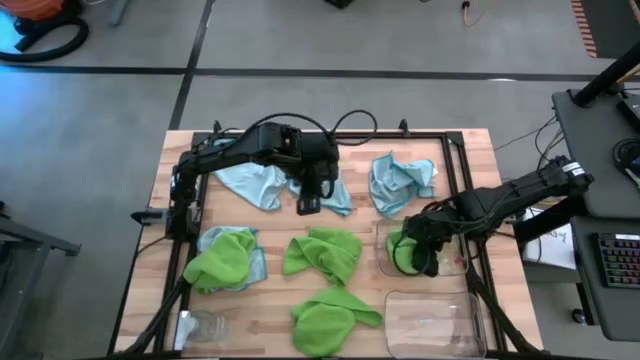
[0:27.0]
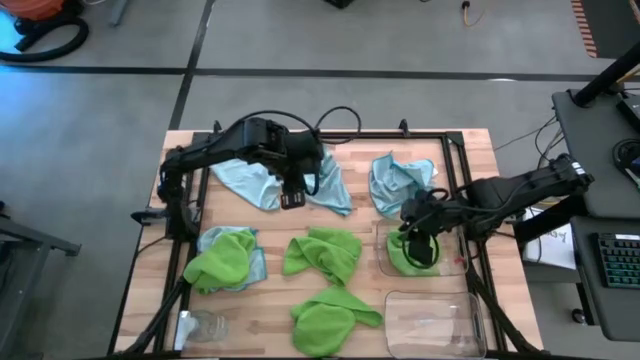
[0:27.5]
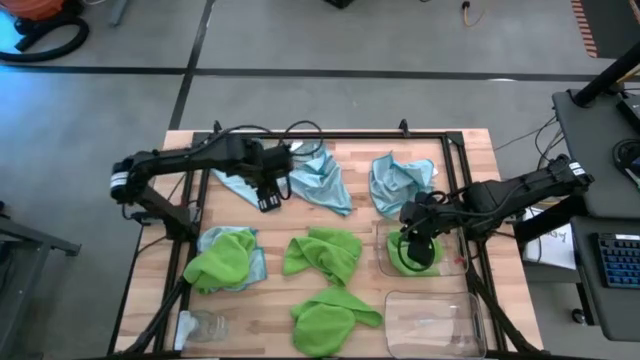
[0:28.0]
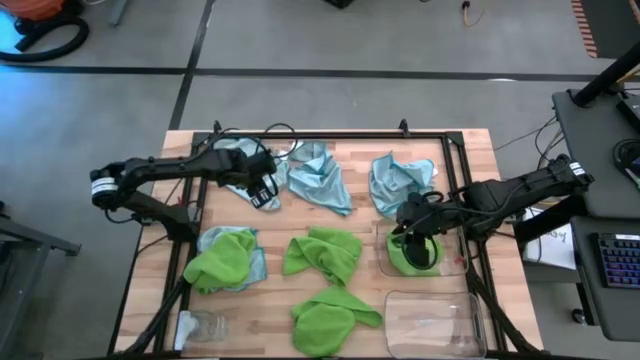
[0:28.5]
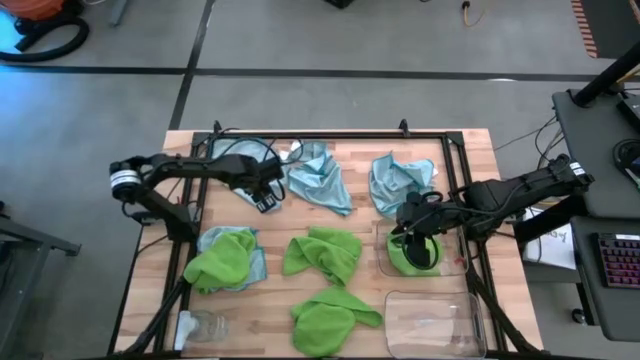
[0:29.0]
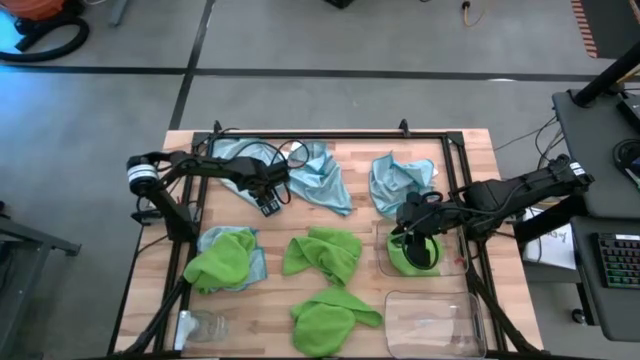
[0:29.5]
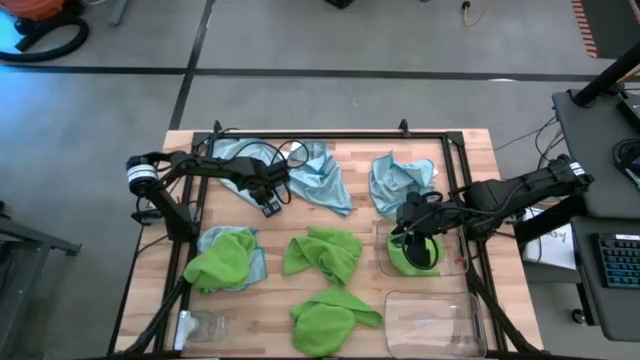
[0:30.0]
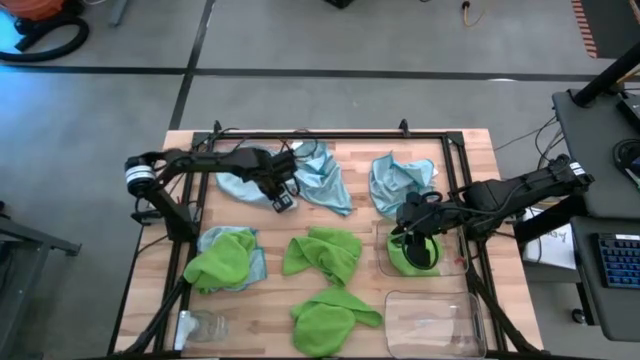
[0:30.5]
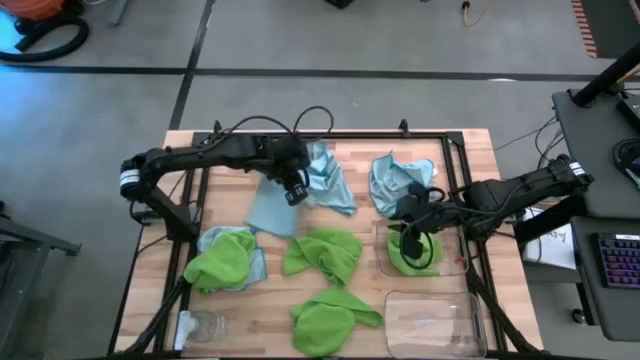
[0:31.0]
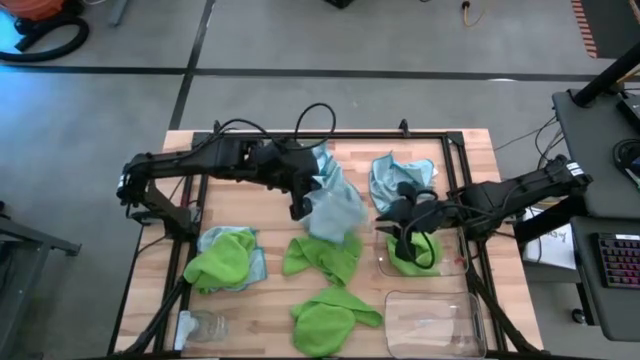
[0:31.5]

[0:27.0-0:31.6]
Task: Sort microfiber towel by color & place in baskets
Put the blue microfiber cloth into the bottom transparent bin

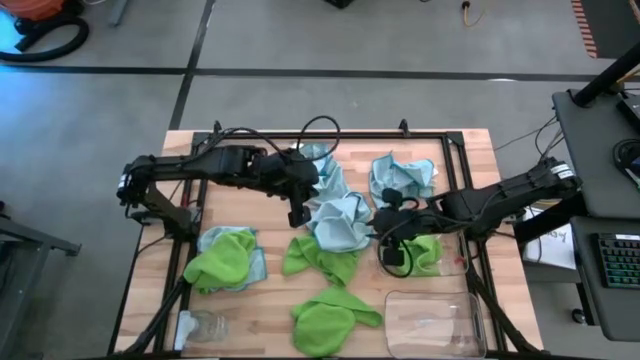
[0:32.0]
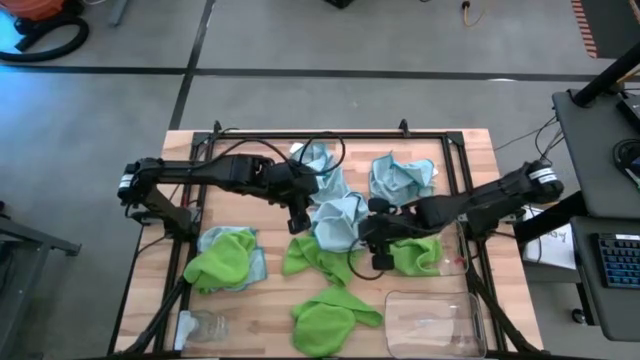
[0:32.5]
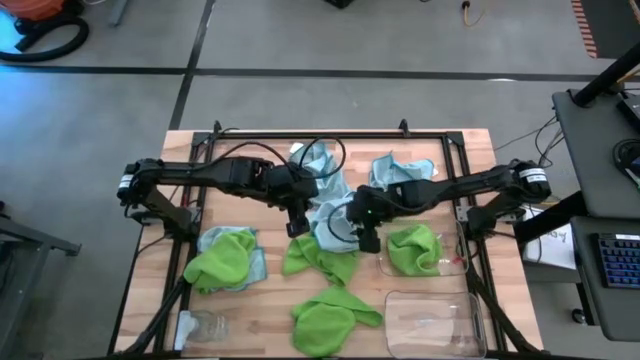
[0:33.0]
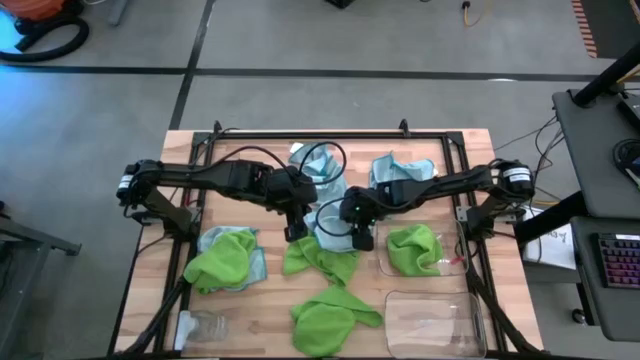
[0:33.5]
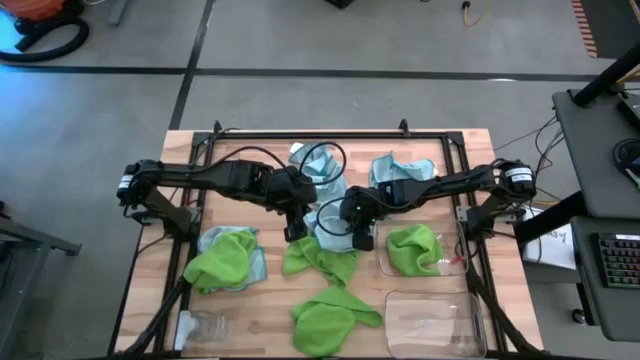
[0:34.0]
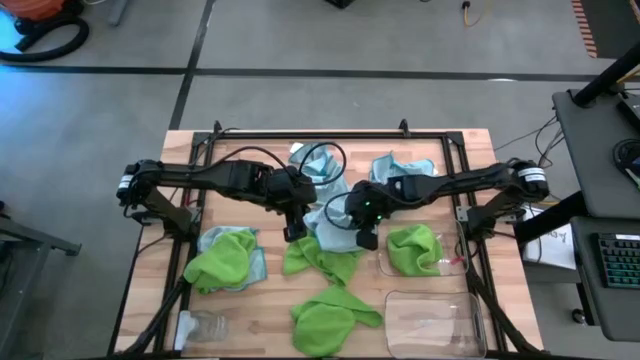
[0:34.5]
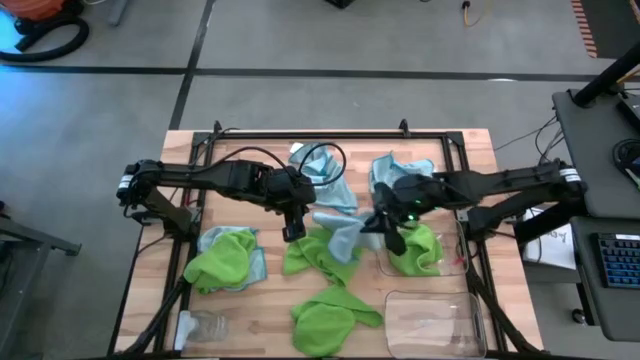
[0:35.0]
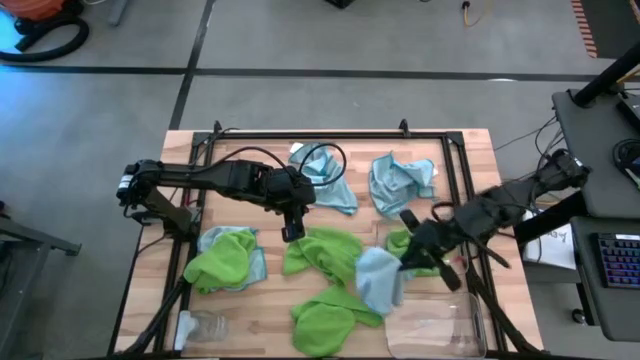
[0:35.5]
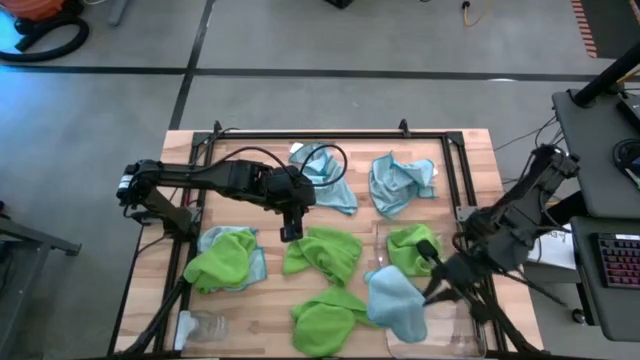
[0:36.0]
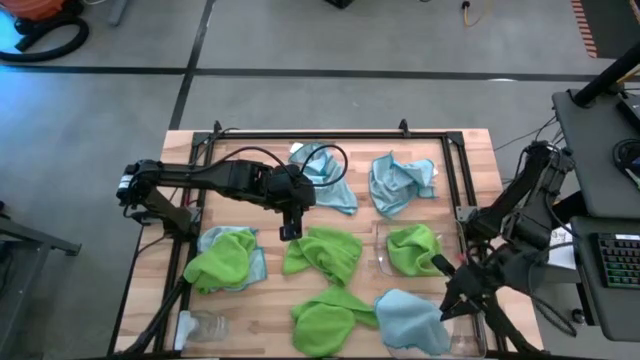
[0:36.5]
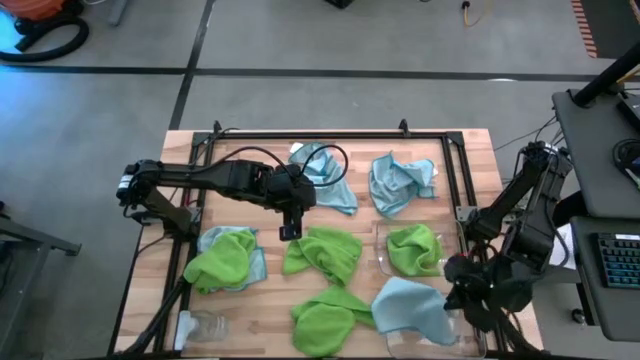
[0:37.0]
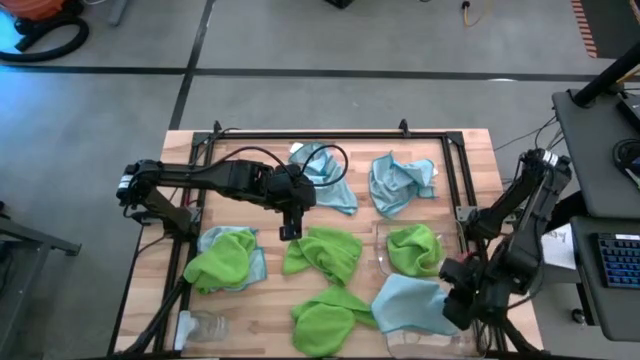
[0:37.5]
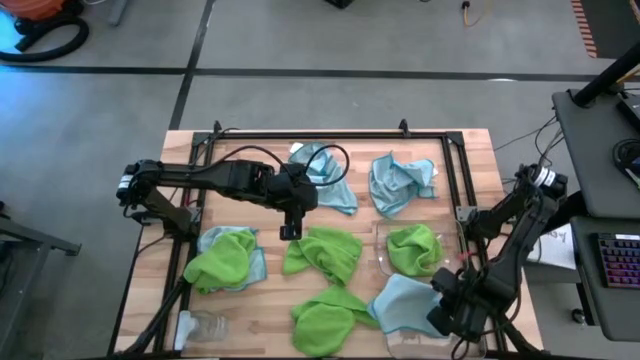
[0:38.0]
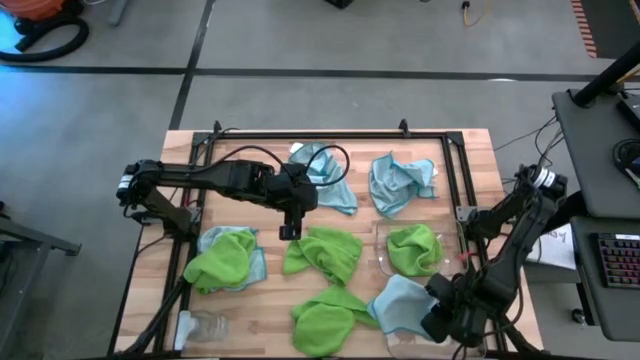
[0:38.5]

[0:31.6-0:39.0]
Put the blue microfiber cloth into the bottom transparent bin

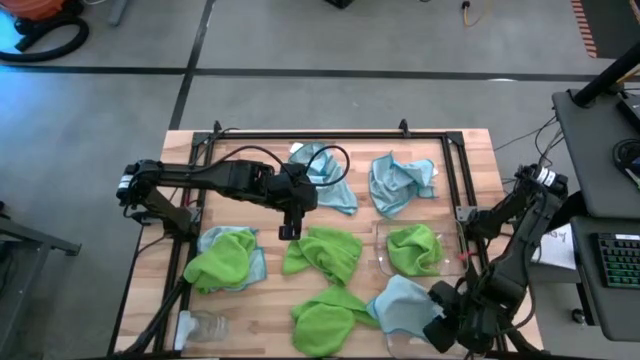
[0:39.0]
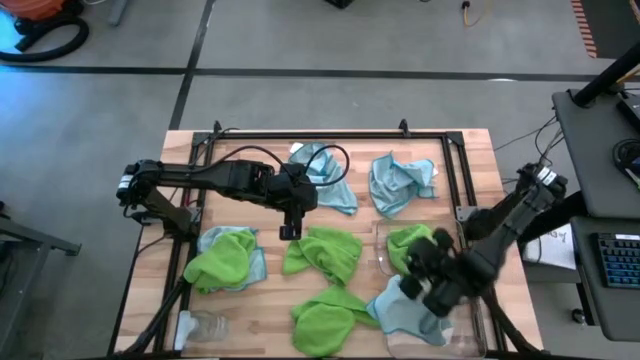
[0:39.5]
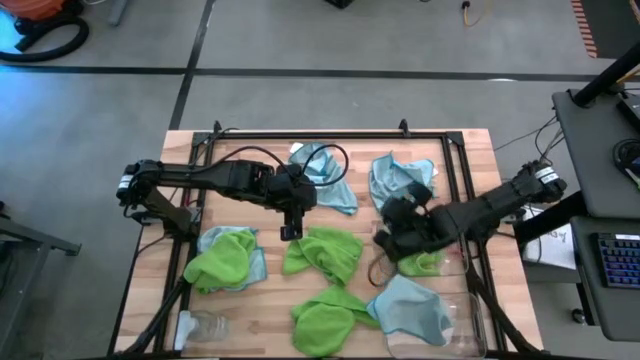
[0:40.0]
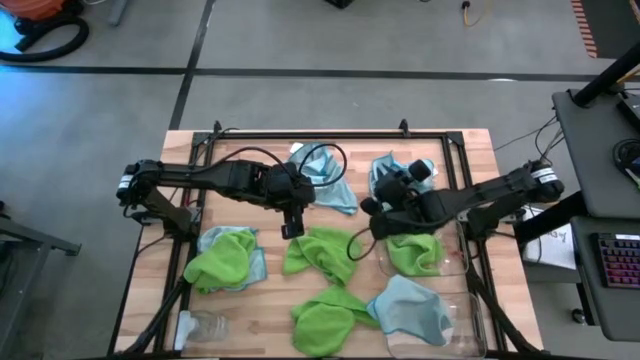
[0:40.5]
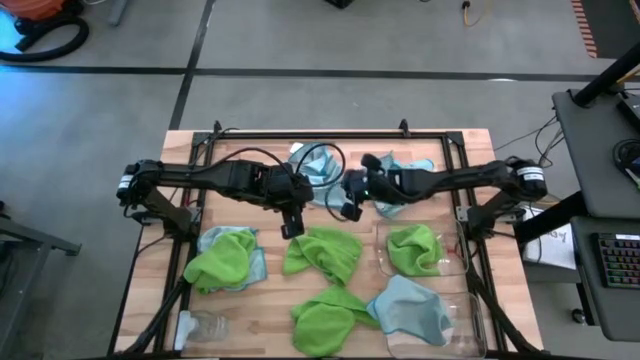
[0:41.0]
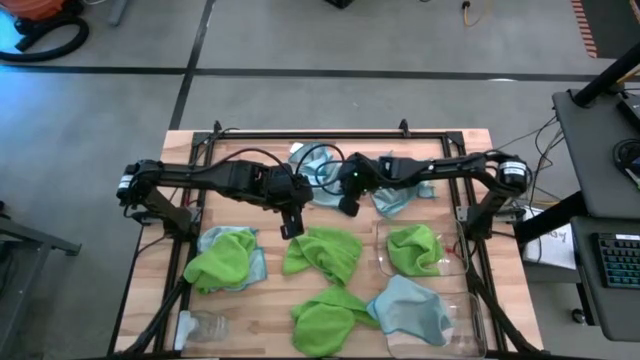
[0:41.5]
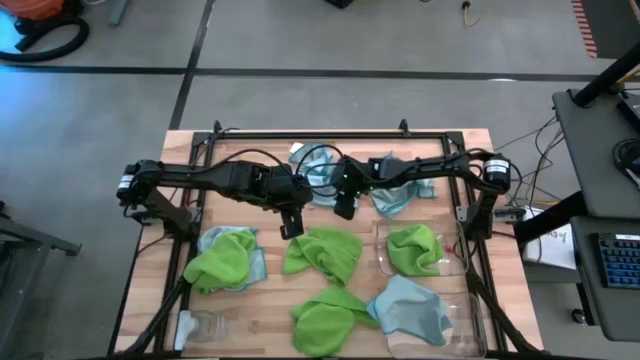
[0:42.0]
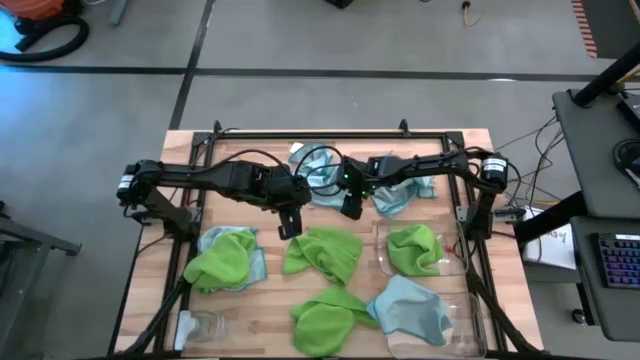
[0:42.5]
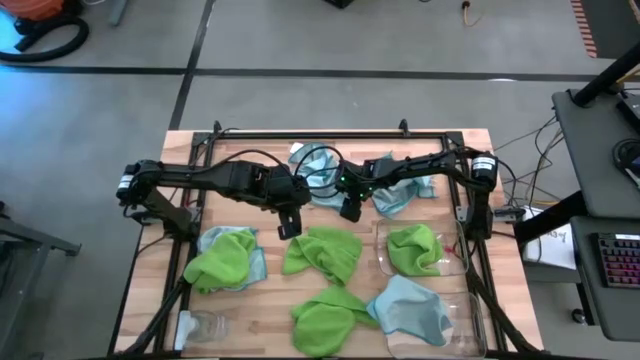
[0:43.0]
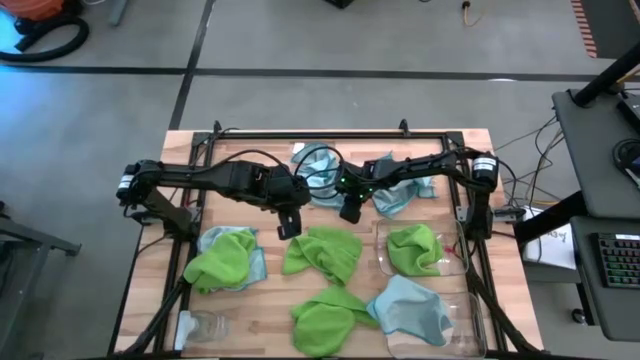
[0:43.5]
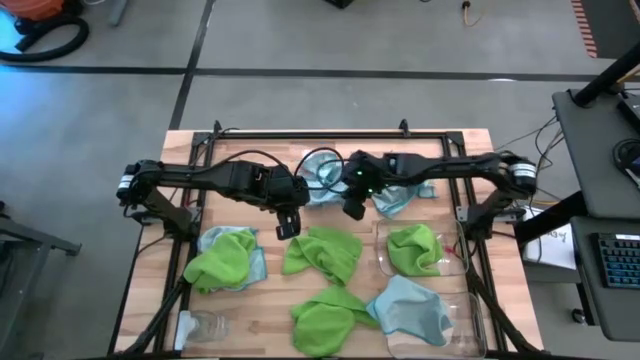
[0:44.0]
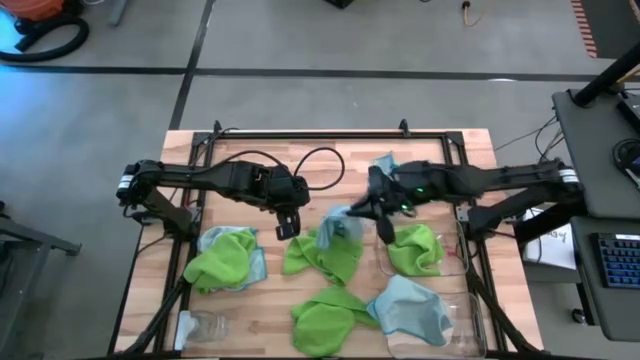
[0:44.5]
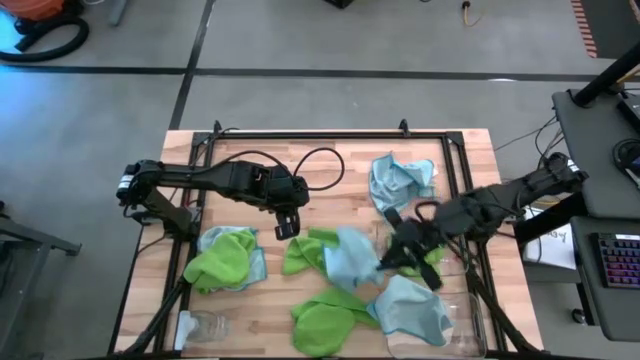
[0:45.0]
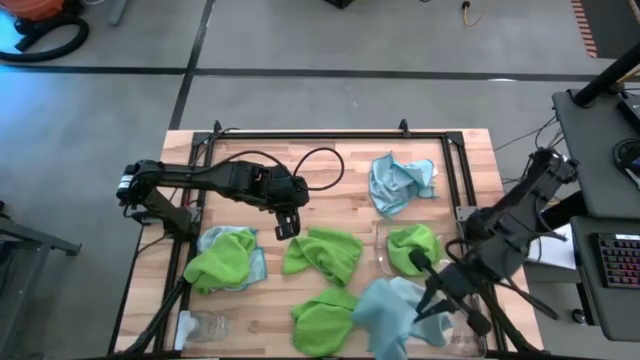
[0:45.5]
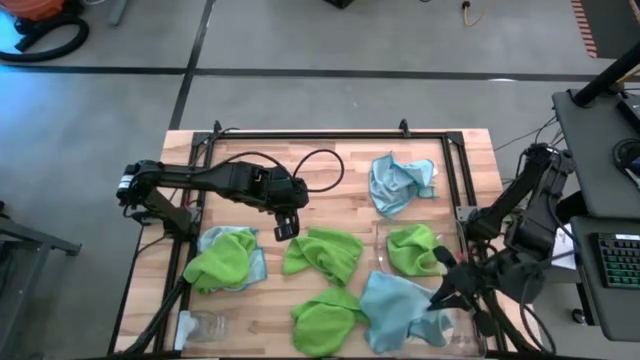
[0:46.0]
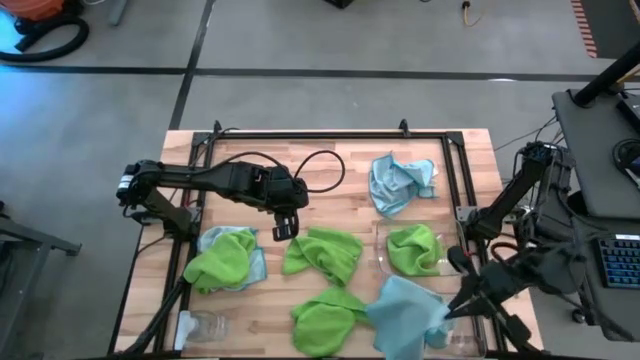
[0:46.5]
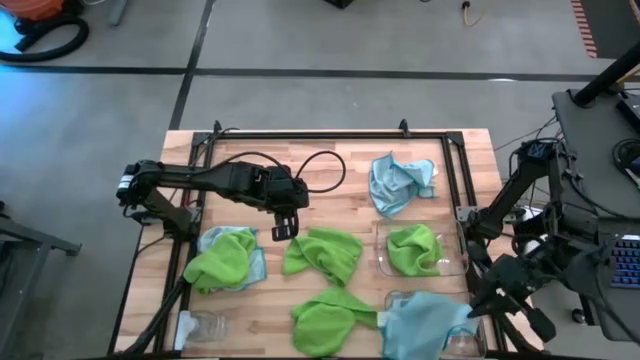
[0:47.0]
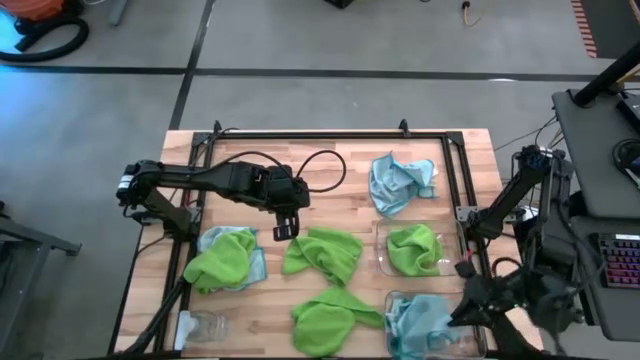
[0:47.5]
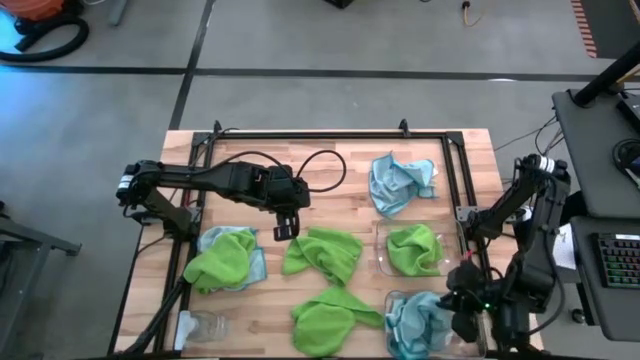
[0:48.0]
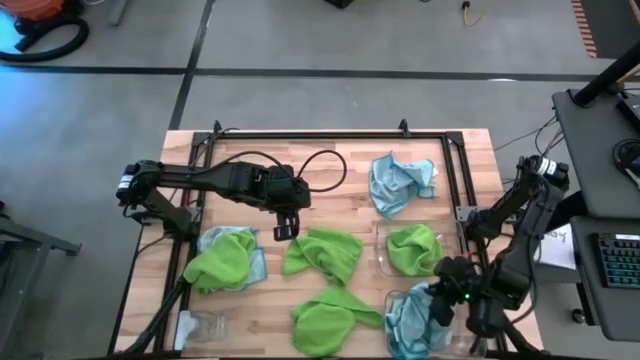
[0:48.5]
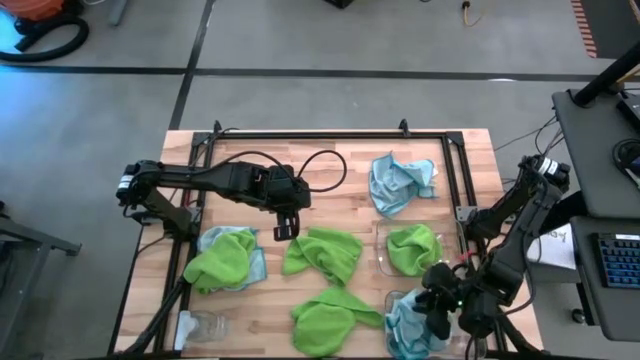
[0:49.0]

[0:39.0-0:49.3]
Put the blue microfiber cloth into the bottom transparent bin
